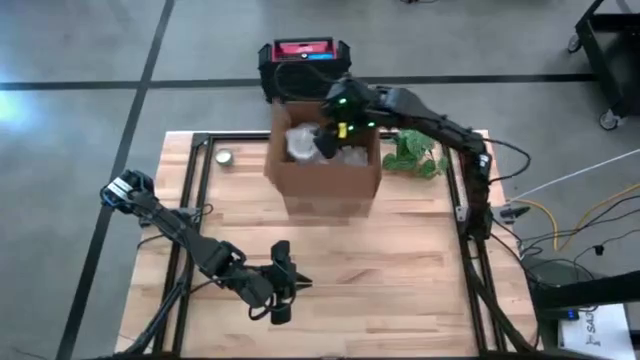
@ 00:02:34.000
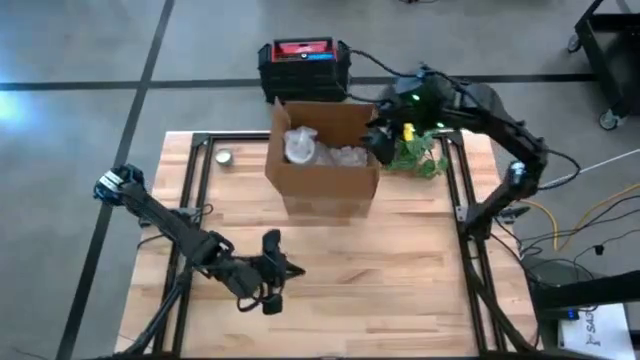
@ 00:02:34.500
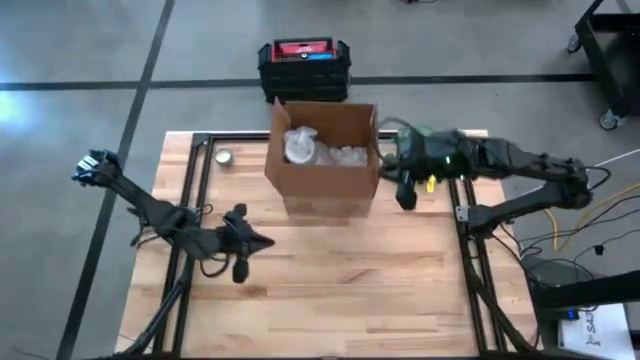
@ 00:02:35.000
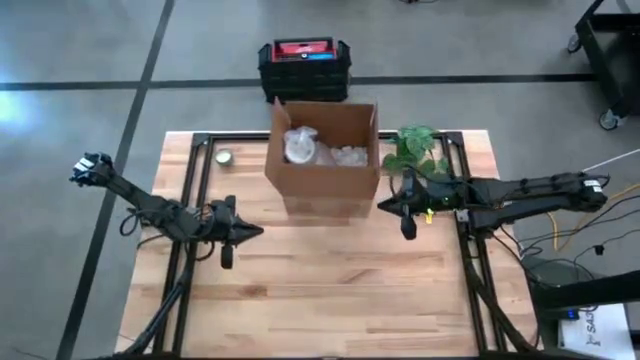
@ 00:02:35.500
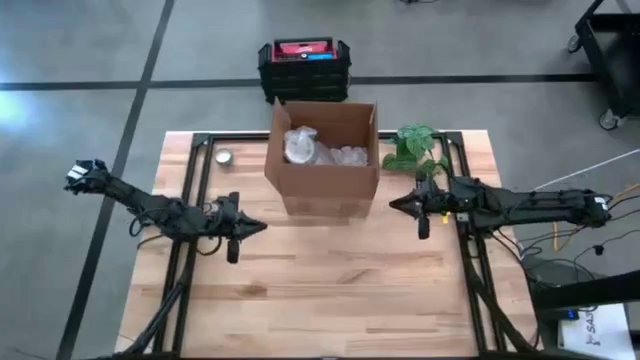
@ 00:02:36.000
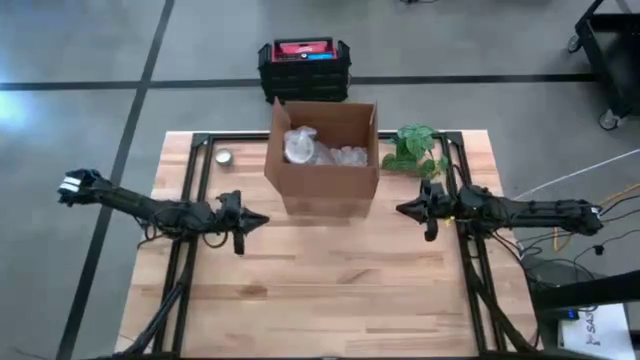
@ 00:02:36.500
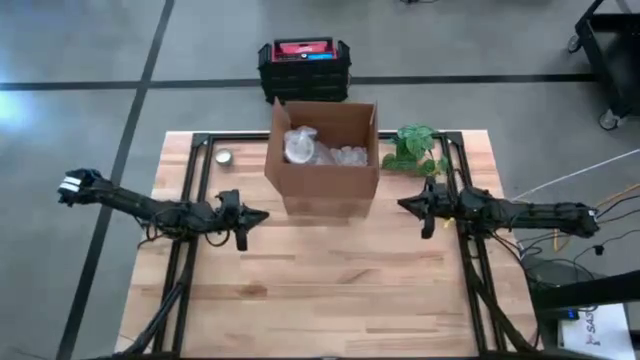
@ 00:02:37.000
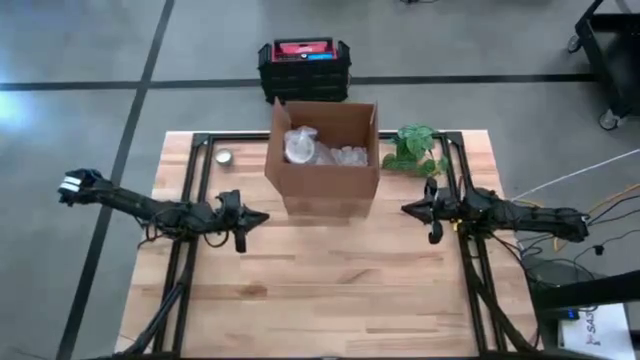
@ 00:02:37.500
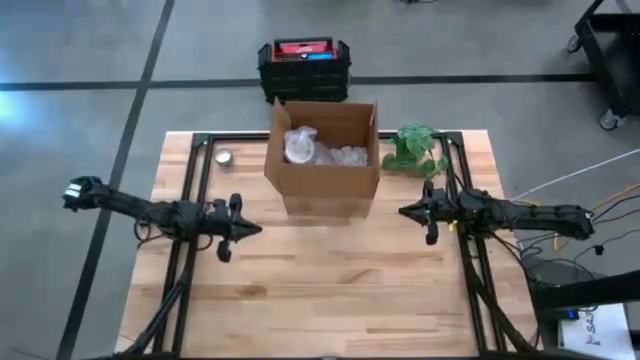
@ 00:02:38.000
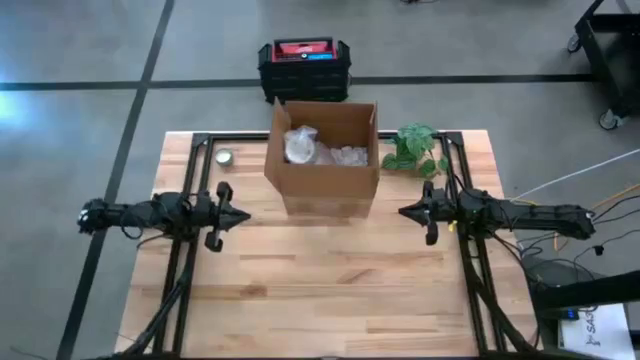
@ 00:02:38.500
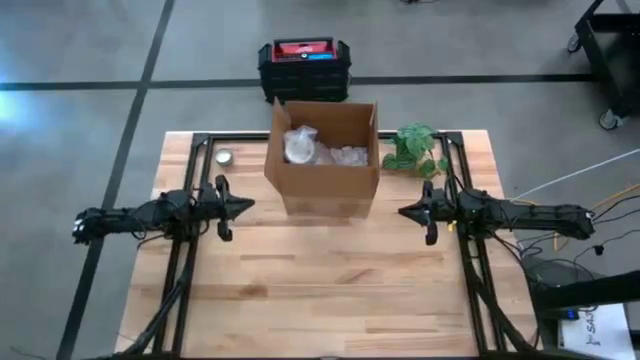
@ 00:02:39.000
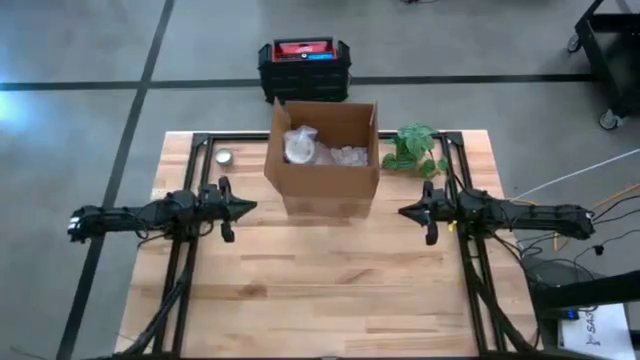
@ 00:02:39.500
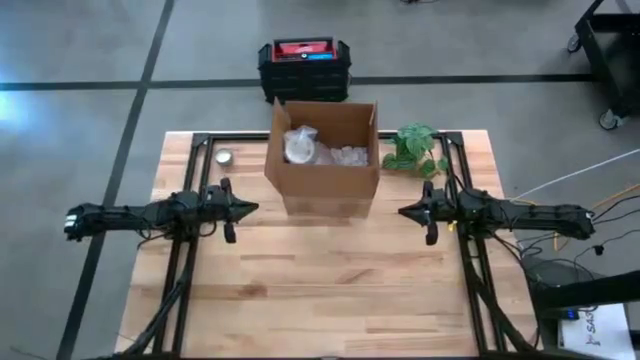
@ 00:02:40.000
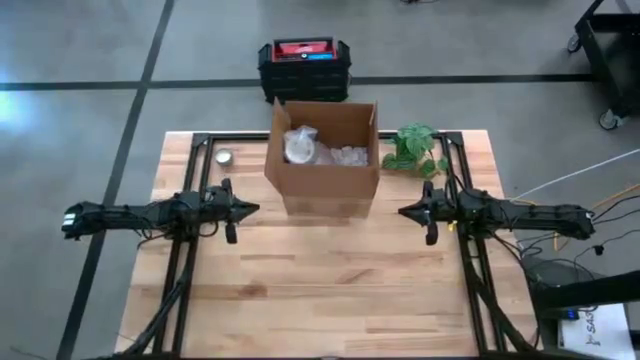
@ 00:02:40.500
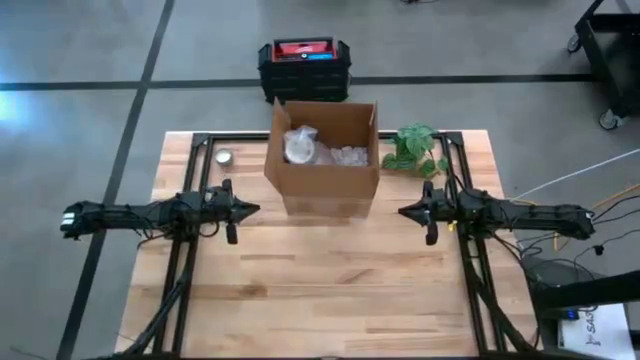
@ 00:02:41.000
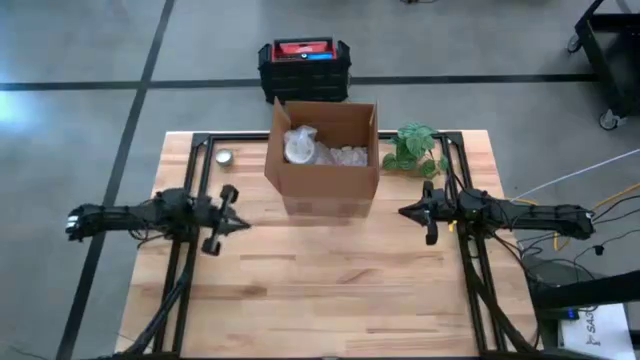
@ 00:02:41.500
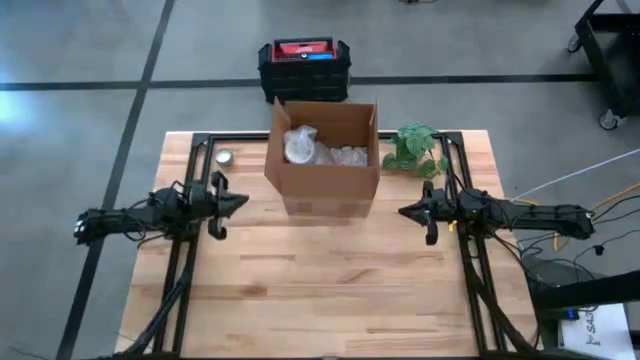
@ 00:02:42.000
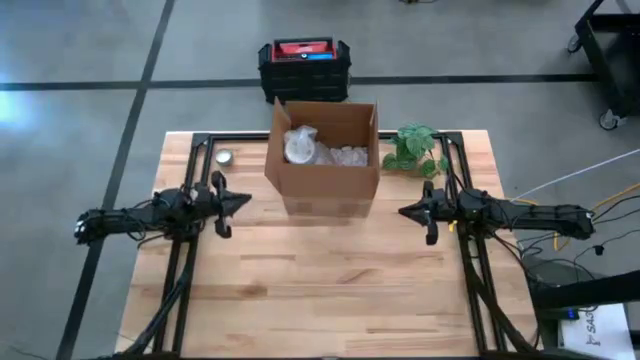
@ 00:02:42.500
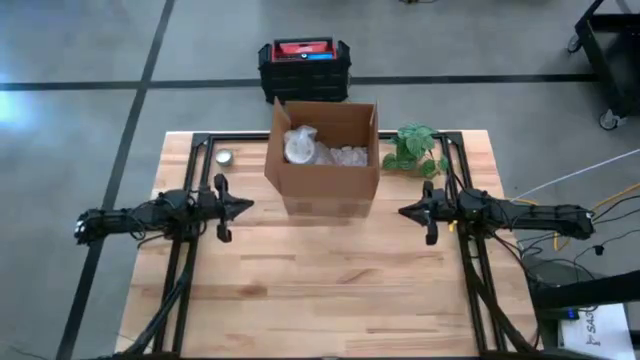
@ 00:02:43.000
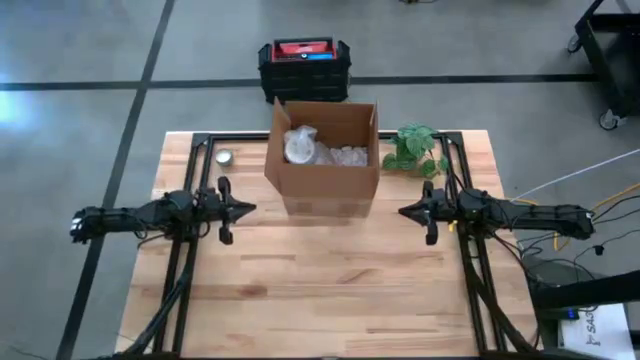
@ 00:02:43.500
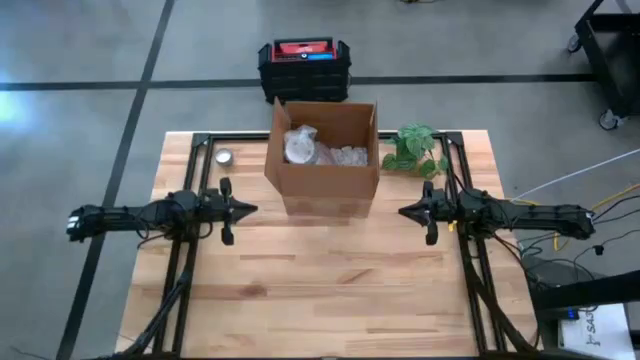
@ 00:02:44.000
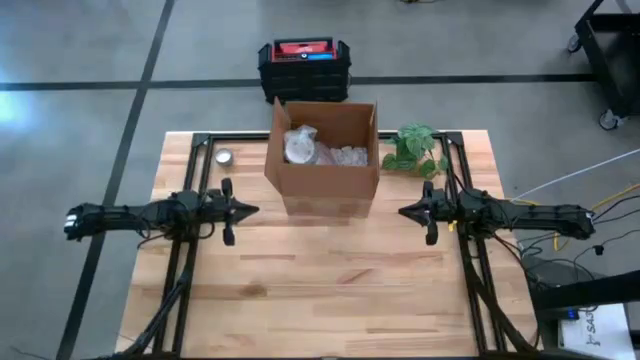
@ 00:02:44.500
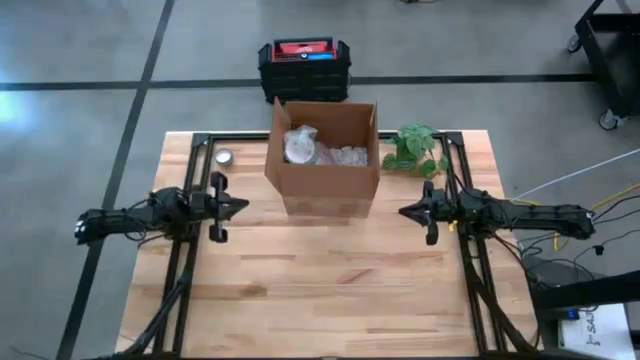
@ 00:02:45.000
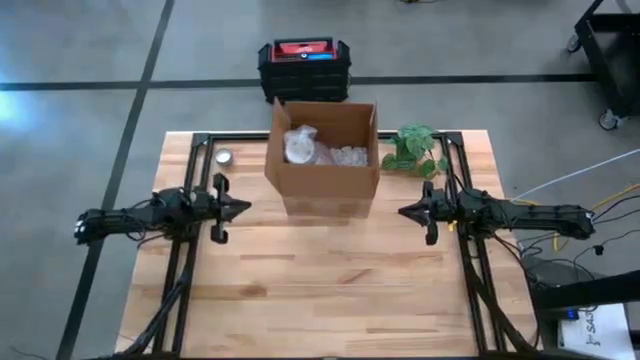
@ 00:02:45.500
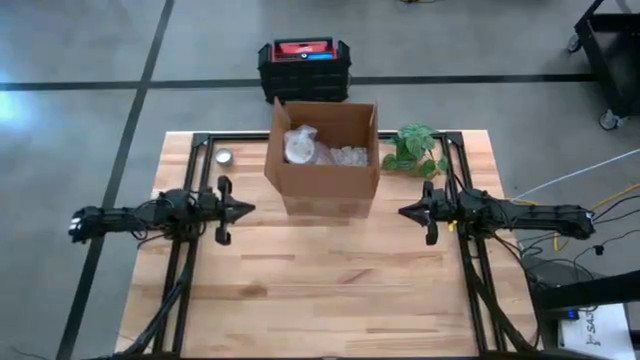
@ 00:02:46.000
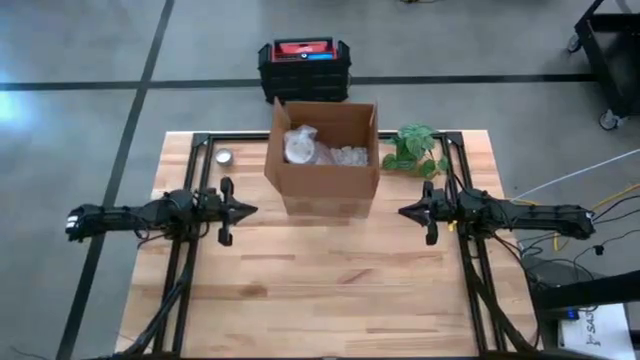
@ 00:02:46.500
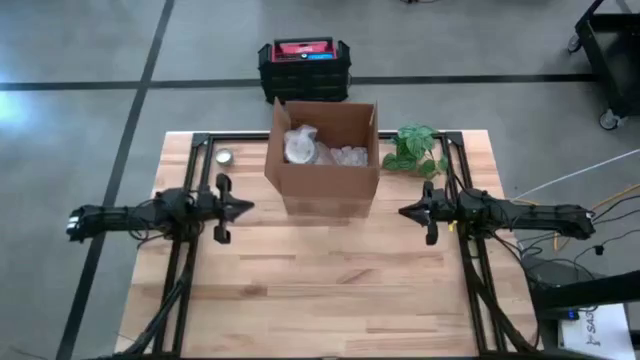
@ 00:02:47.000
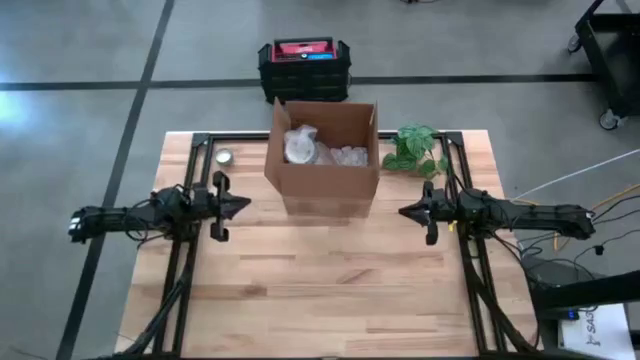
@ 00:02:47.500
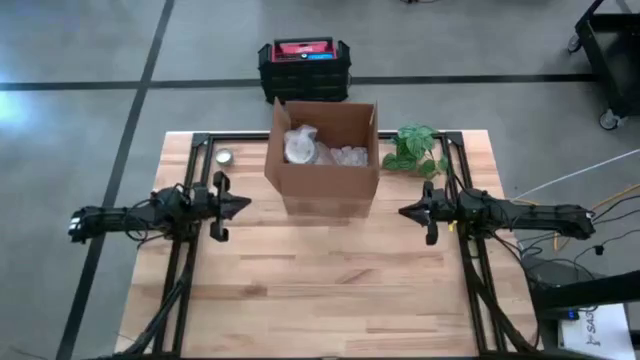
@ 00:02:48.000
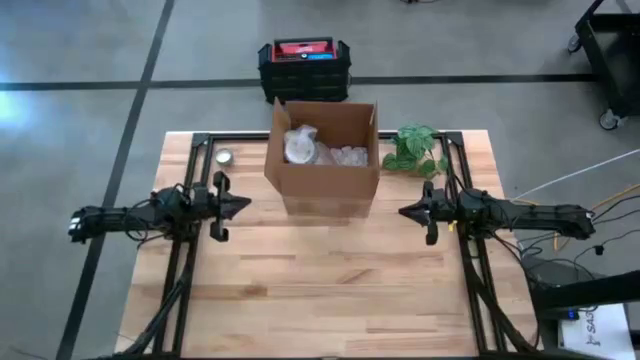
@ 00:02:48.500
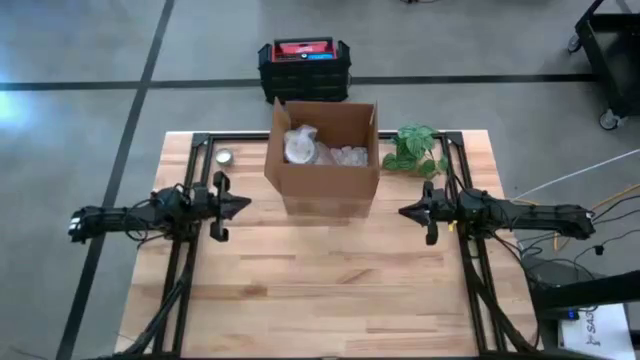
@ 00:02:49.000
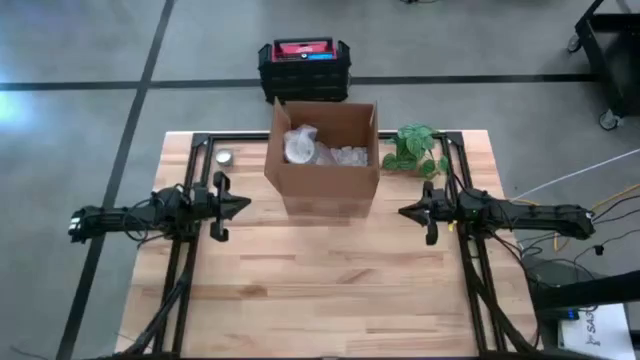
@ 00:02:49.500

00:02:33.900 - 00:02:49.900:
Task: wrap mug
Return to Home Position
